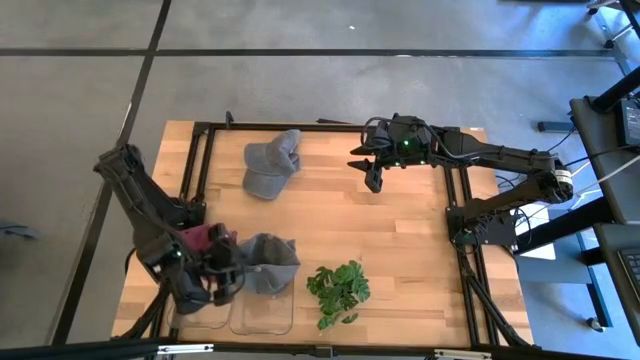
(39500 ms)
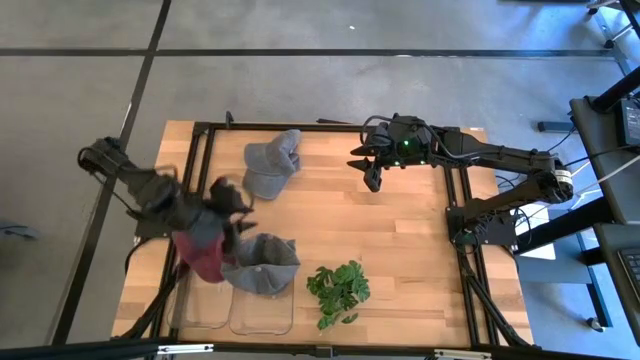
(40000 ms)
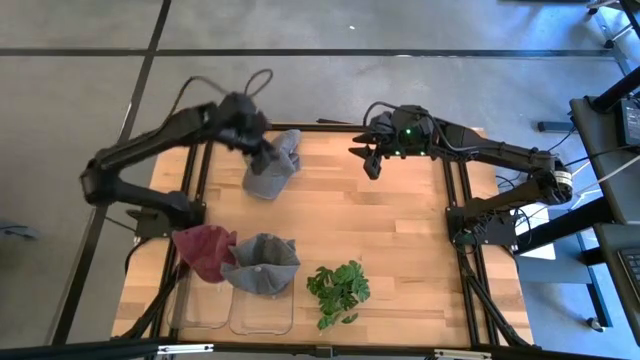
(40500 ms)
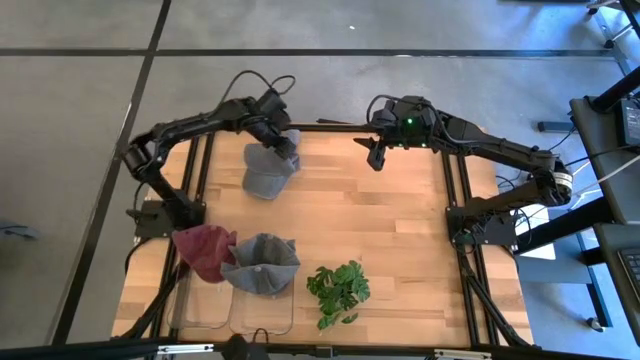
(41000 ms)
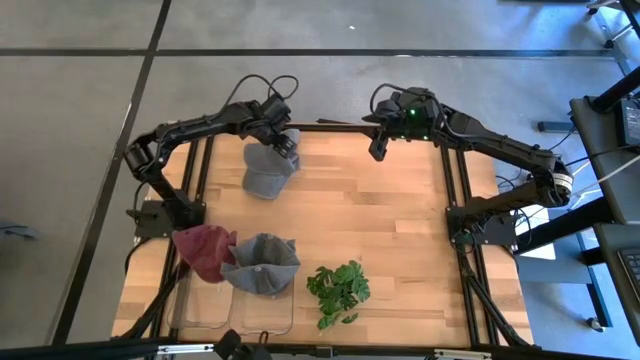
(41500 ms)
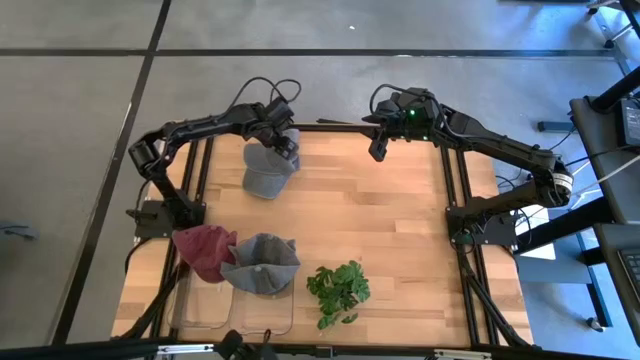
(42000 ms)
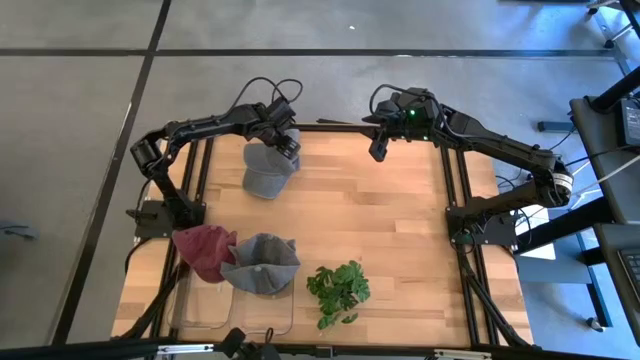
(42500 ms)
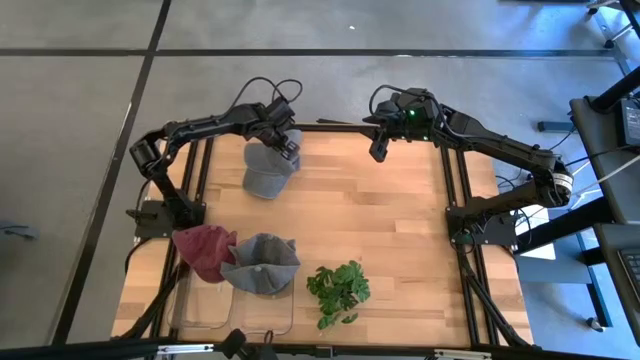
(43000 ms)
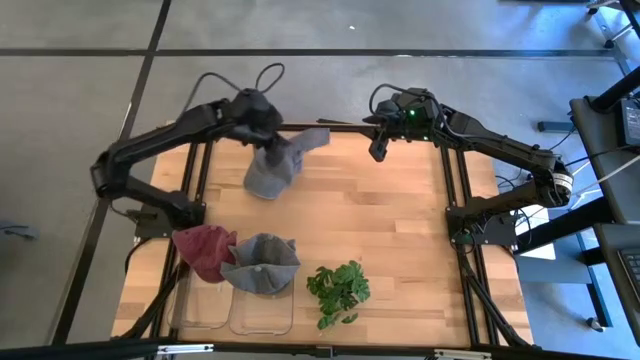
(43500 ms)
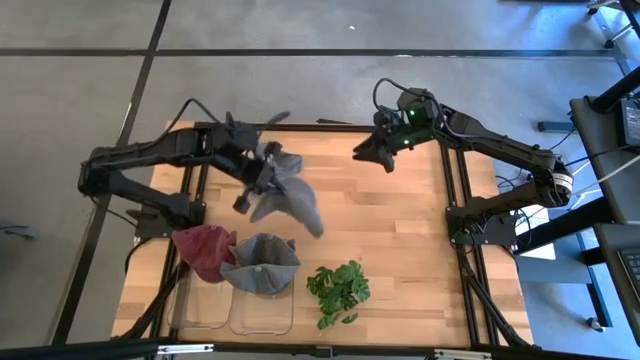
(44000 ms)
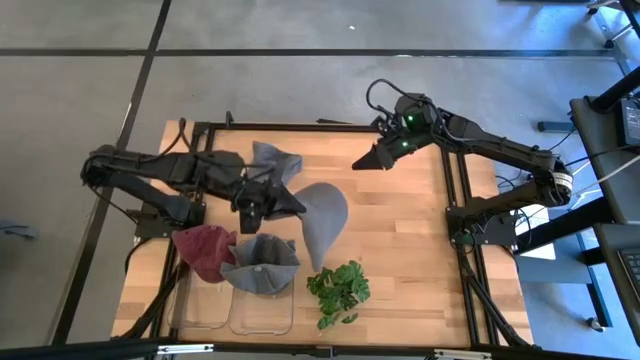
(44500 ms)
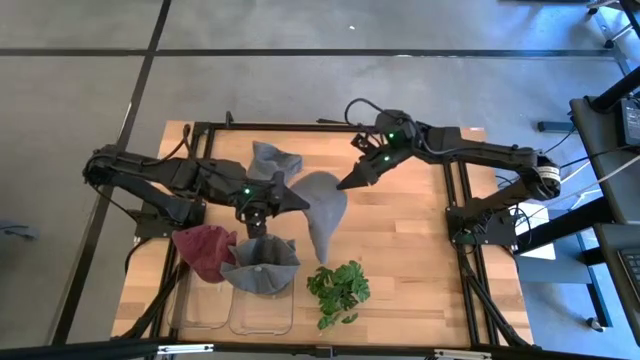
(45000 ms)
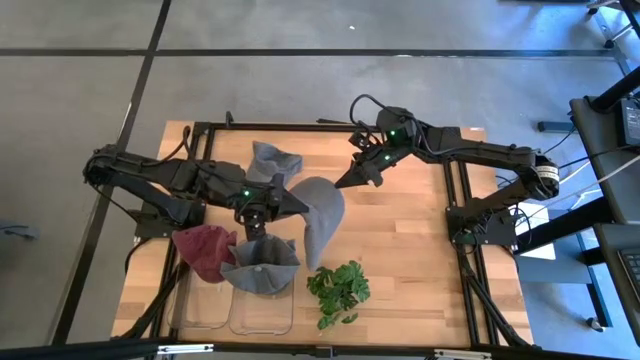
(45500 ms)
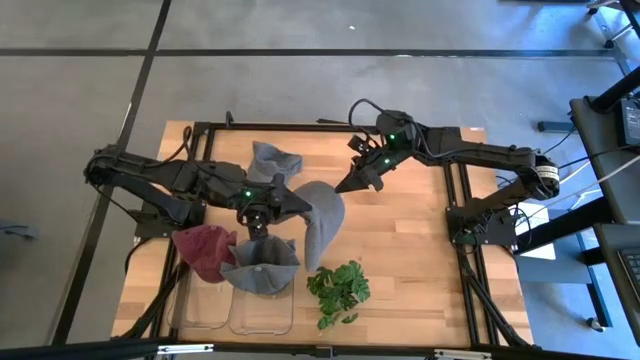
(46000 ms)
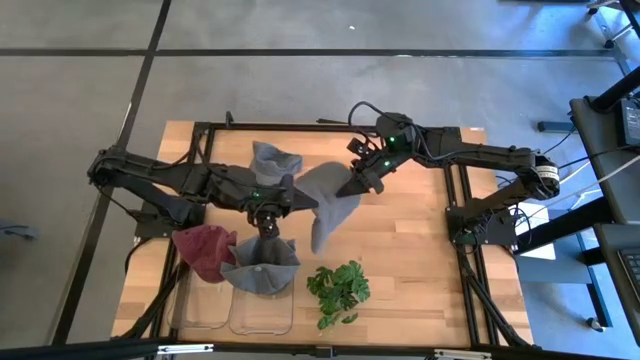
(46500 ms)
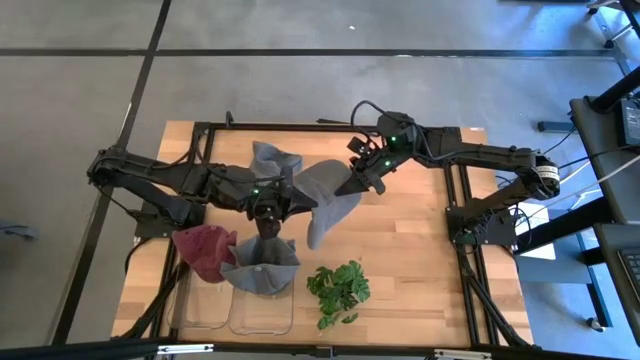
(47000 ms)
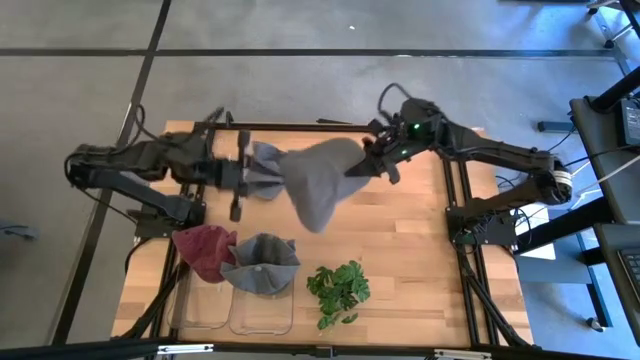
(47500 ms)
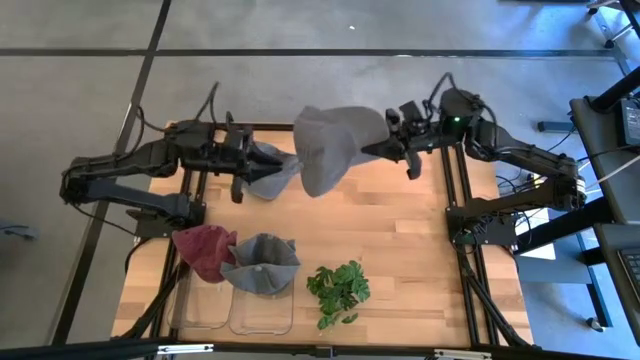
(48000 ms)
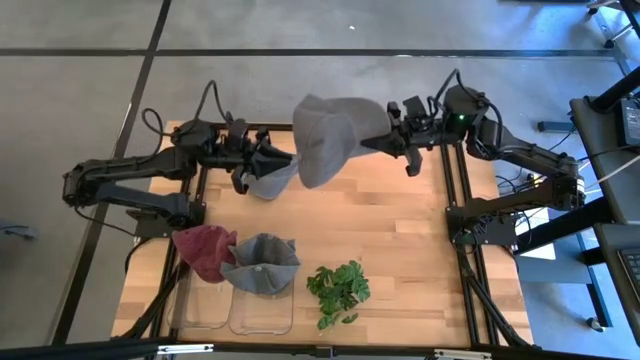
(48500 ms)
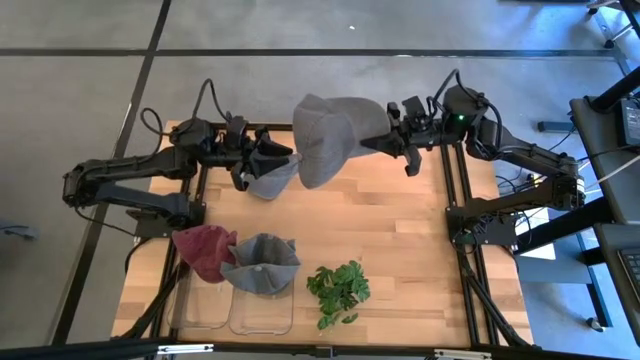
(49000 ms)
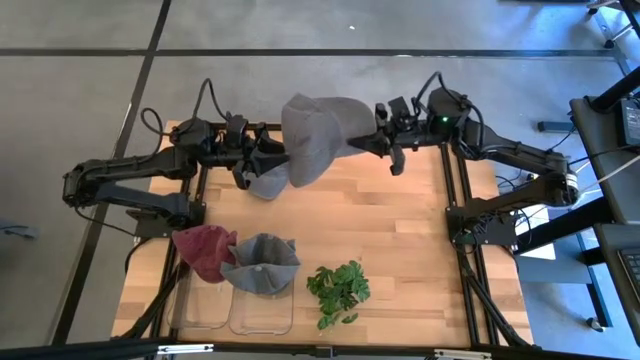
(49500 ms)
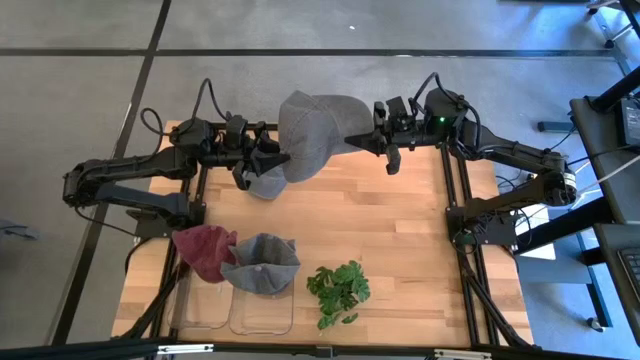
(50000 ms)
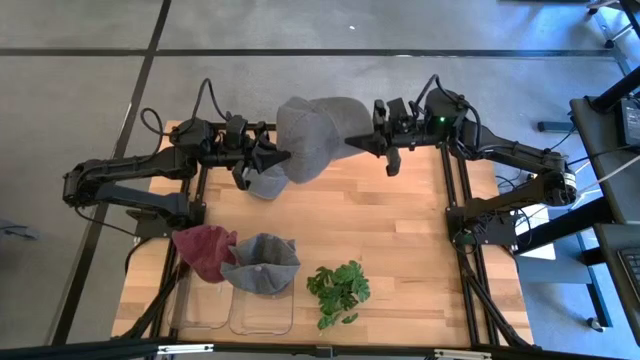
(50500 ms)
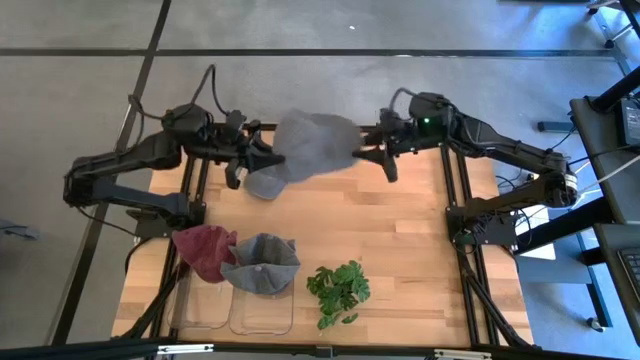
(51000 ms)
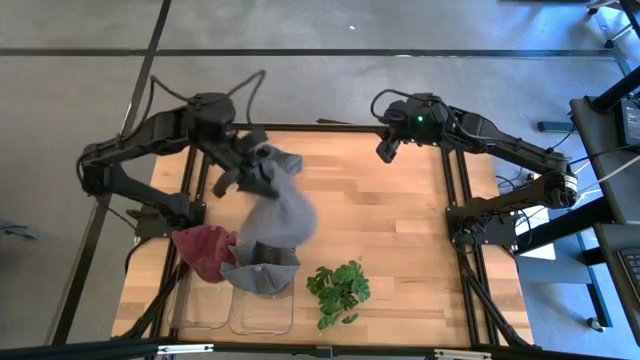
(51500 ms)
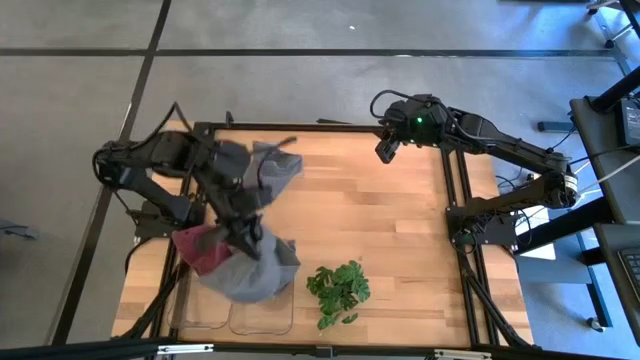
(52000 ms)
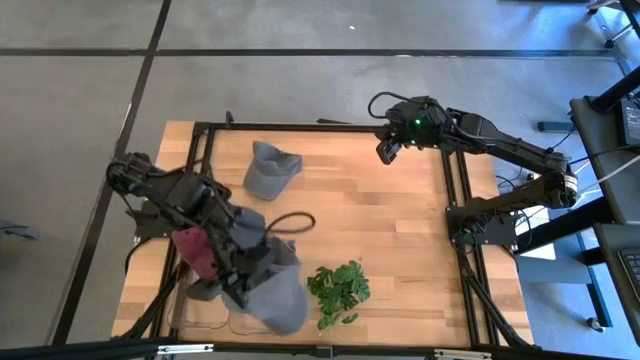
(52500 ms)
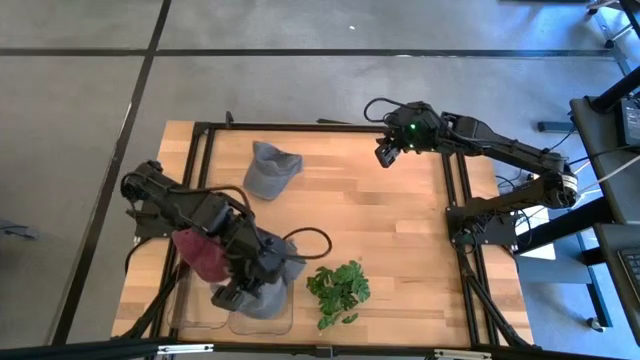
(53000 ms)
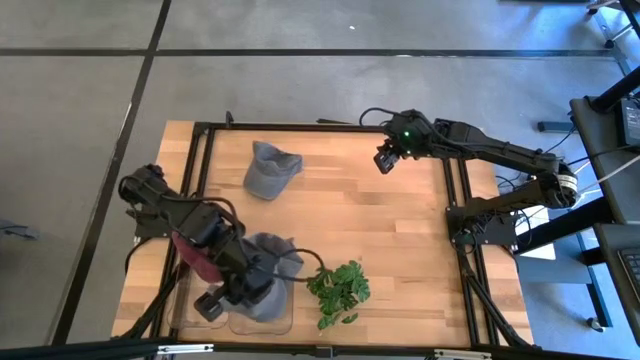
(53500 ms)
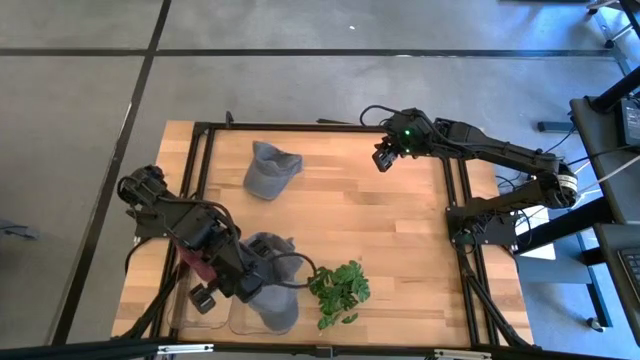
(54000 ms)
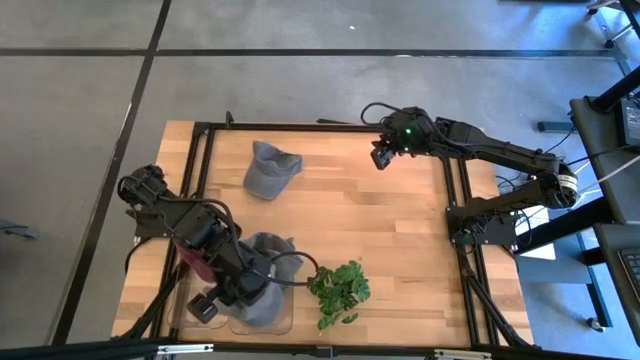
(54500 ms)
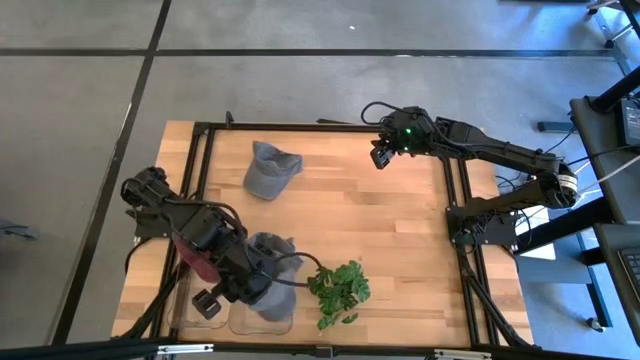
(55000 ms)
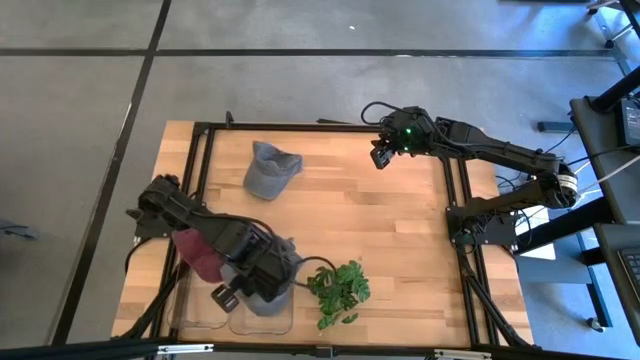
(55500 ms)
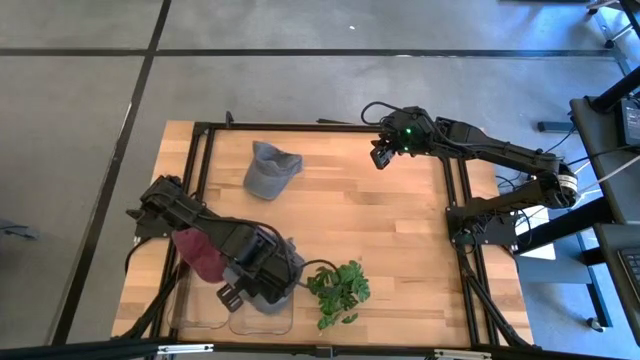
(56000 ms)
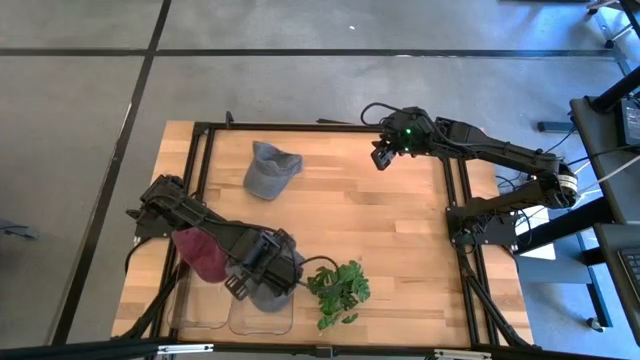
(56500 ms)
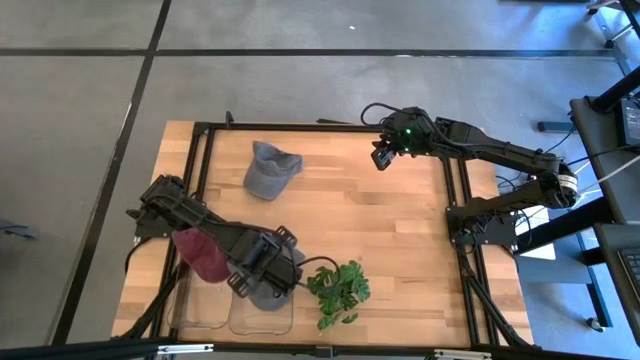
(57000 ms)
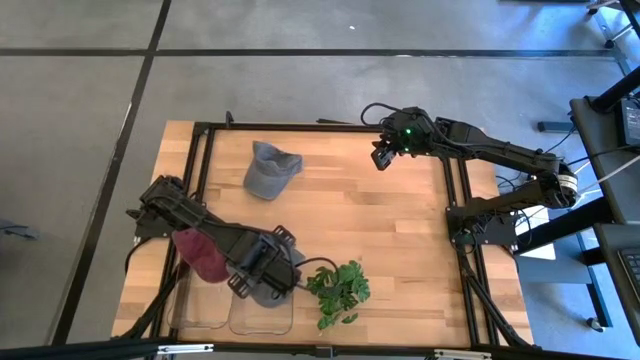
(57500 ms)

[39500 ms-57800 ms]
Task: Pick & Place hat
Put the gray cap into the right transparent bin

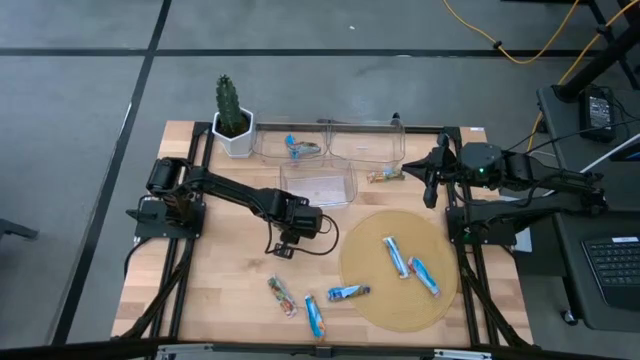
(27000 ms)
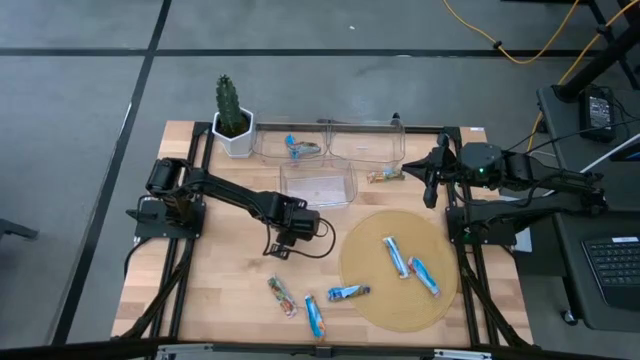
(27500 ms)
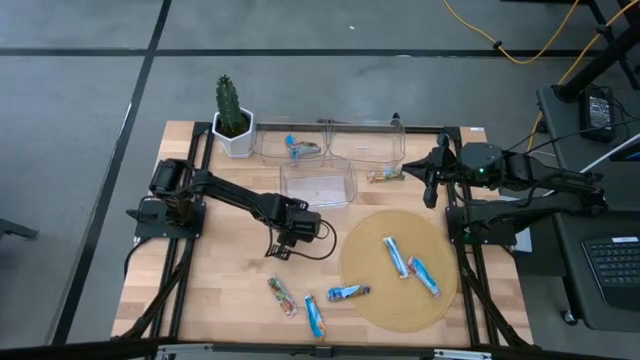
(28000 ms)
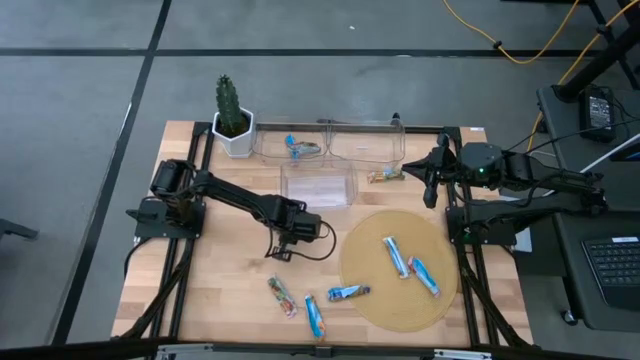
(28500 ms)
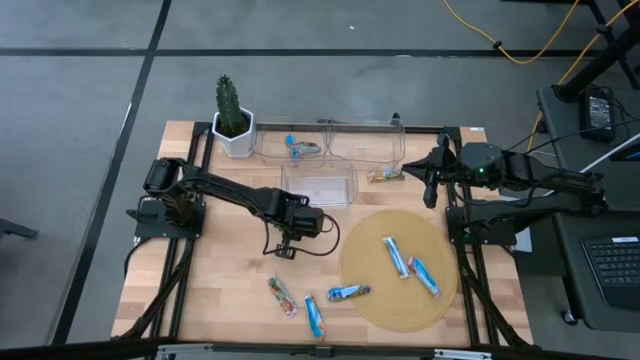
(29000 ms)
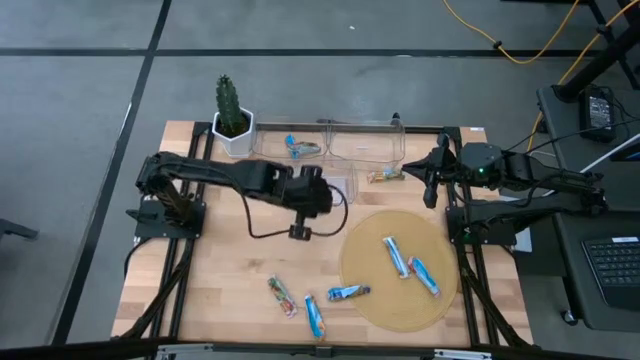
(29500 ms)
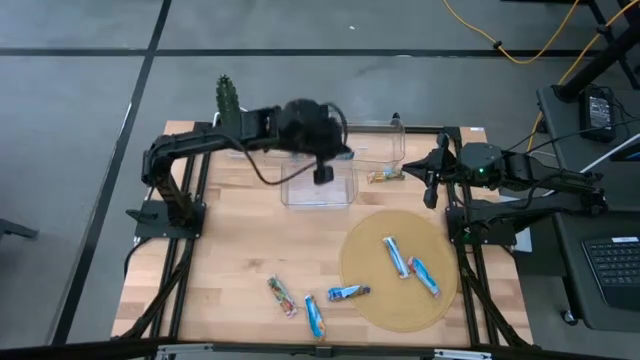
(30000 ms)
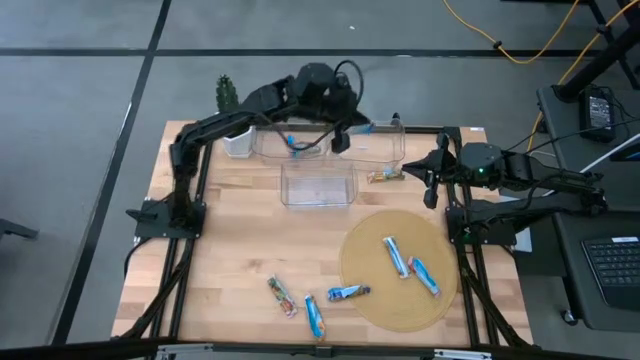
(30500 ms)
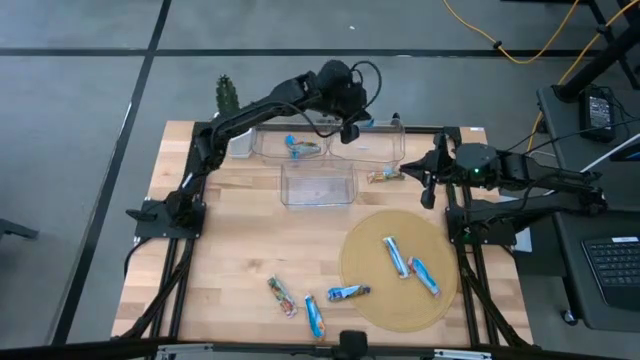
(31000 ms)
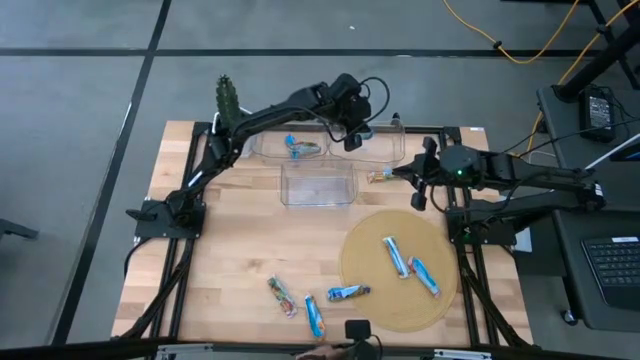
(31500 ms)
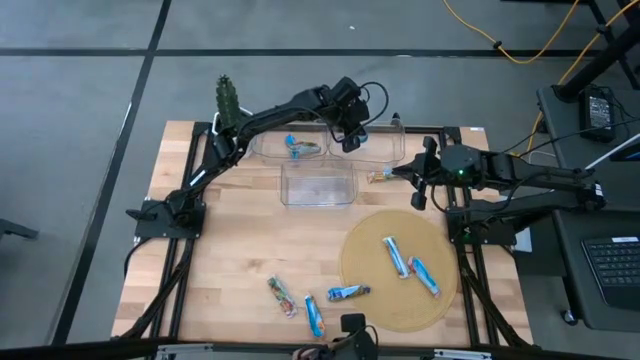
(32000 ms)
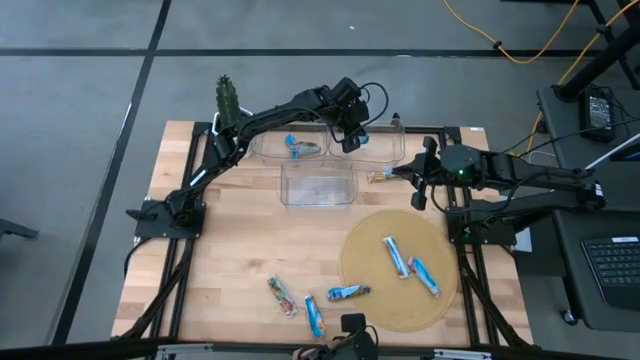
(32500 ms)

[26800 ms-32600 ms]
Task: Pick and place Granola Bars by type
Put the blue granola bar into the top right transparent bin
